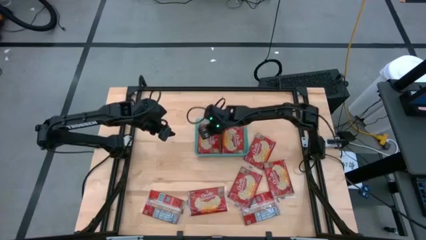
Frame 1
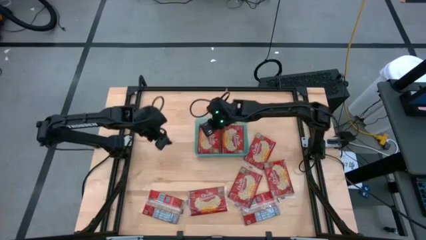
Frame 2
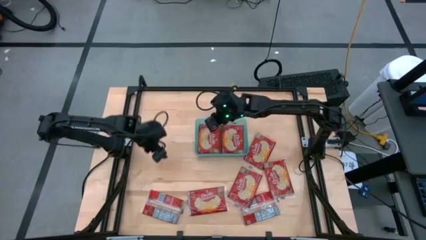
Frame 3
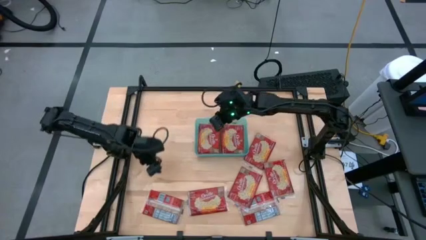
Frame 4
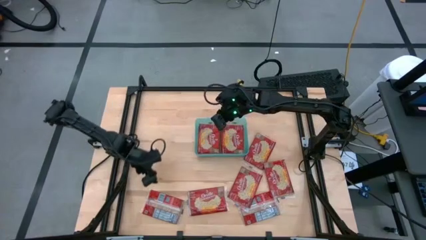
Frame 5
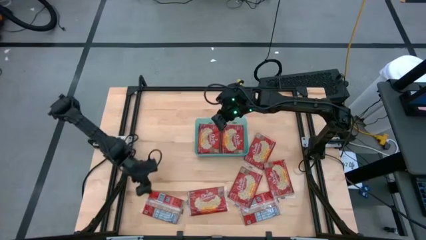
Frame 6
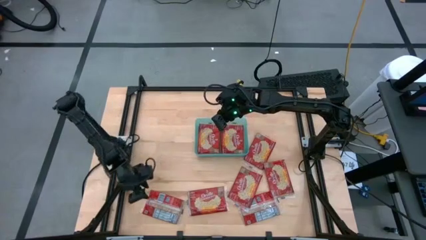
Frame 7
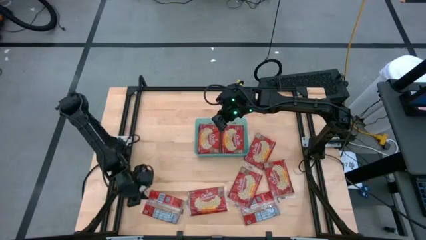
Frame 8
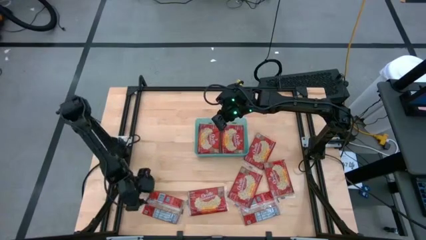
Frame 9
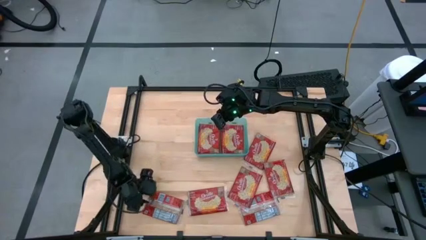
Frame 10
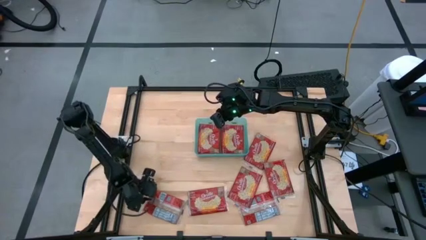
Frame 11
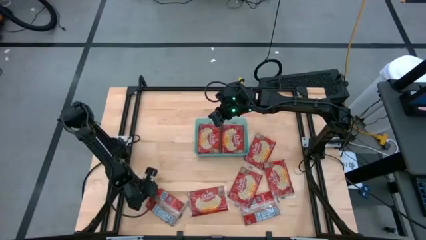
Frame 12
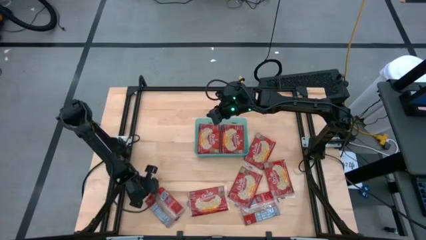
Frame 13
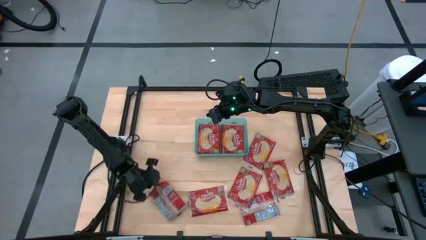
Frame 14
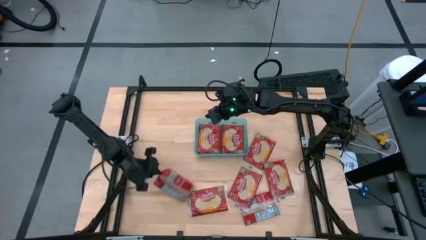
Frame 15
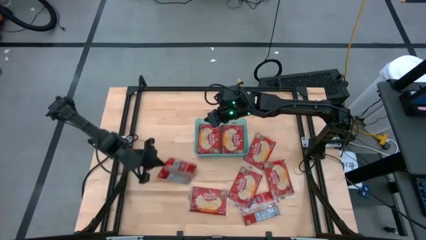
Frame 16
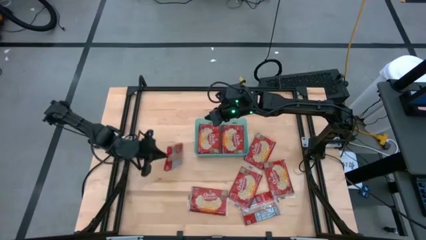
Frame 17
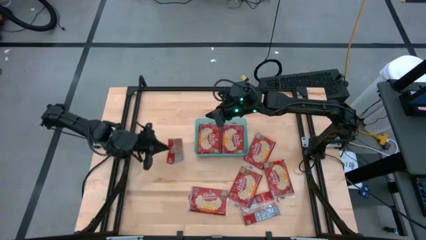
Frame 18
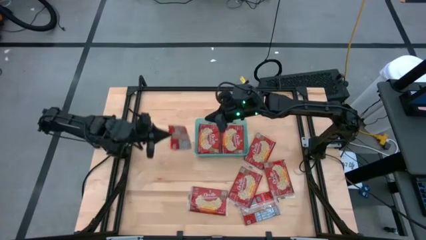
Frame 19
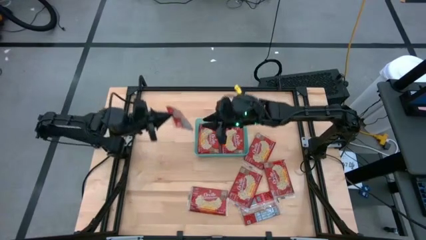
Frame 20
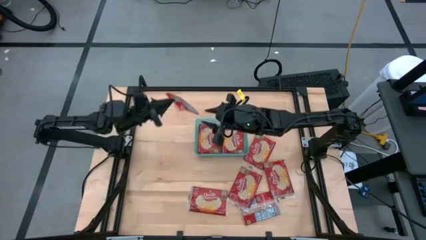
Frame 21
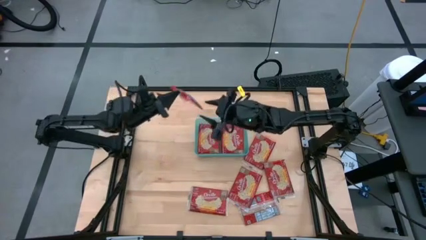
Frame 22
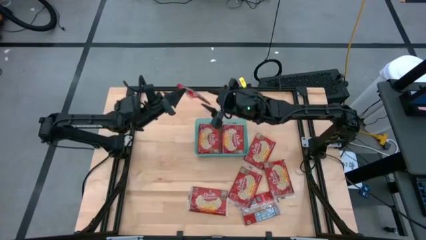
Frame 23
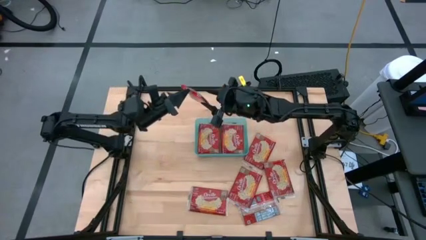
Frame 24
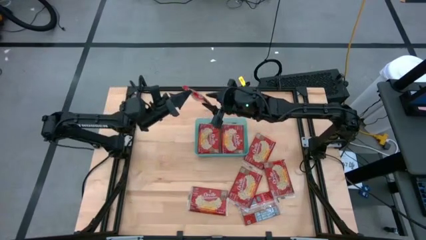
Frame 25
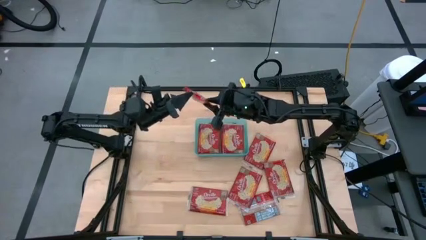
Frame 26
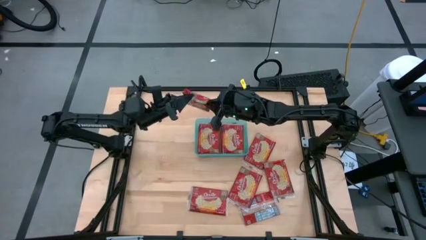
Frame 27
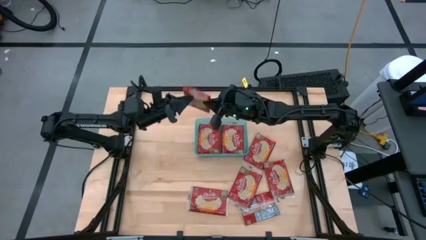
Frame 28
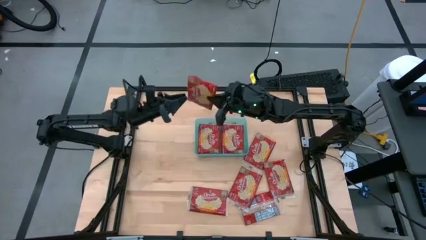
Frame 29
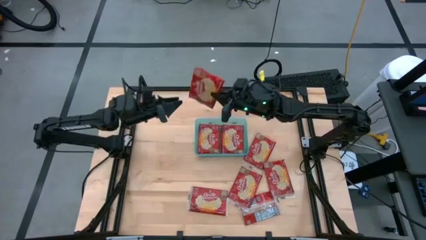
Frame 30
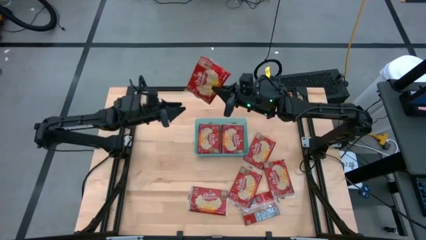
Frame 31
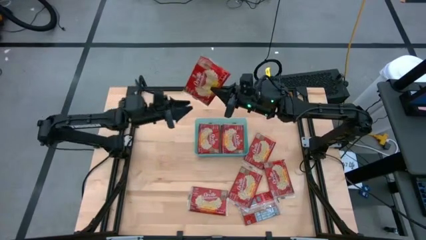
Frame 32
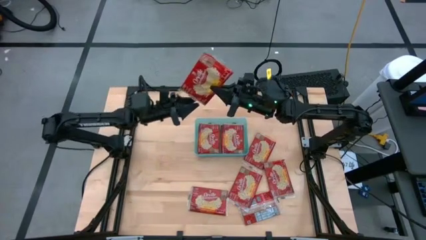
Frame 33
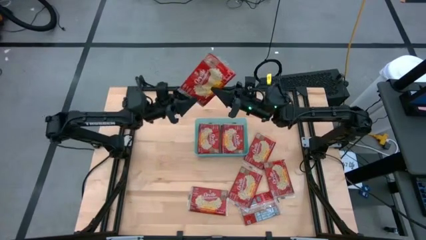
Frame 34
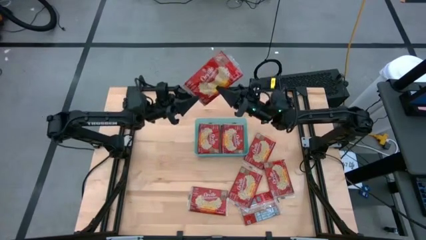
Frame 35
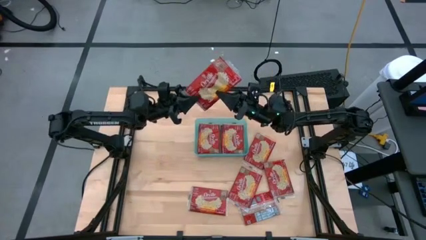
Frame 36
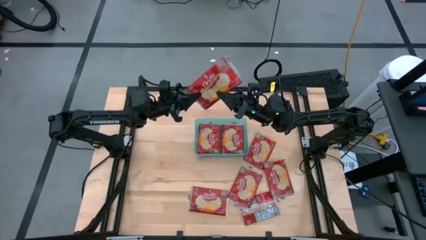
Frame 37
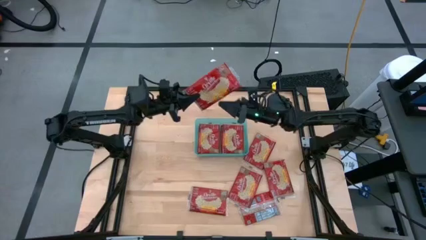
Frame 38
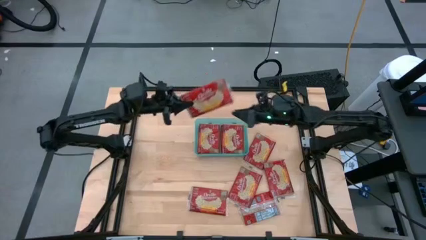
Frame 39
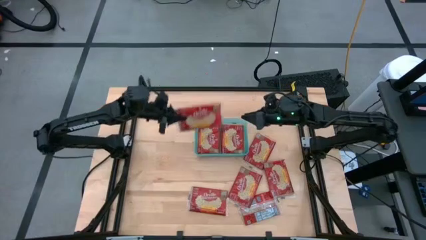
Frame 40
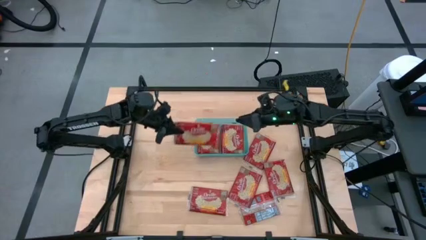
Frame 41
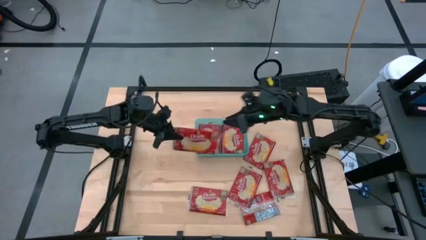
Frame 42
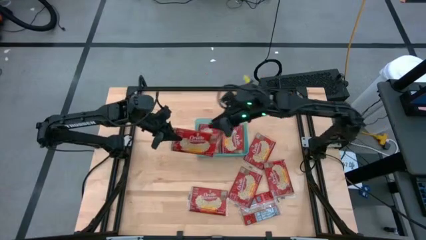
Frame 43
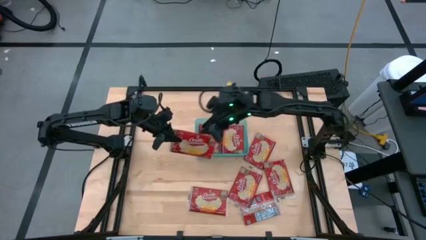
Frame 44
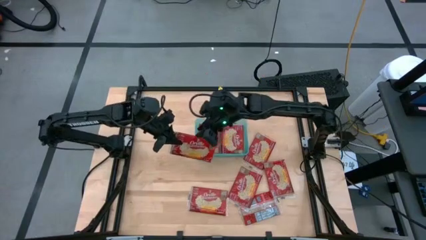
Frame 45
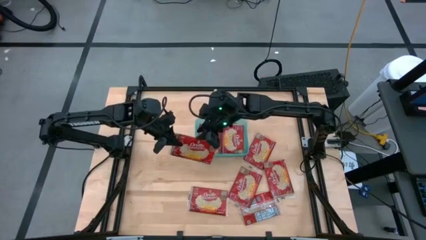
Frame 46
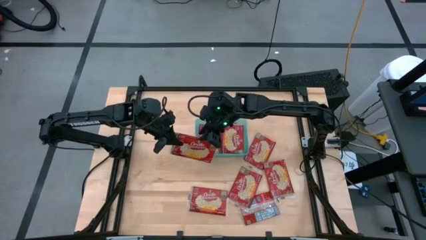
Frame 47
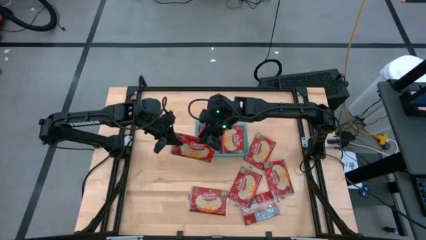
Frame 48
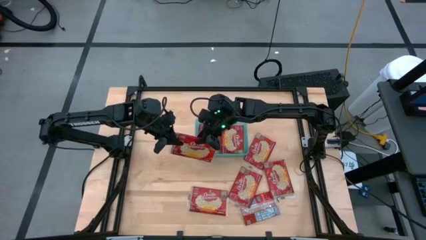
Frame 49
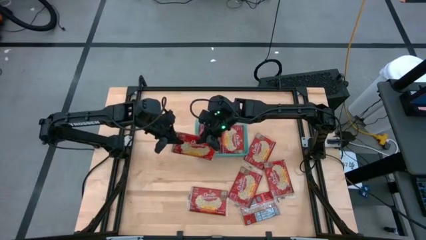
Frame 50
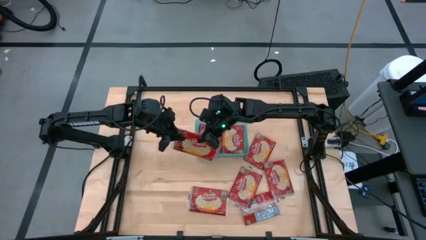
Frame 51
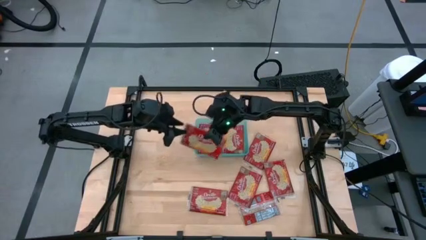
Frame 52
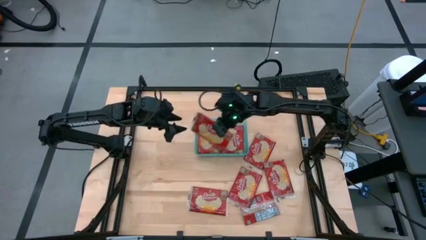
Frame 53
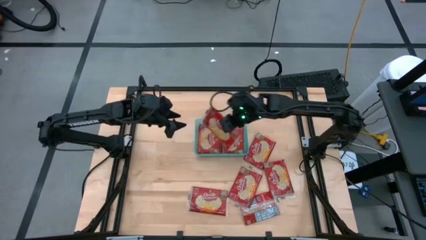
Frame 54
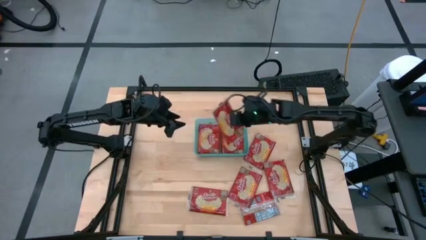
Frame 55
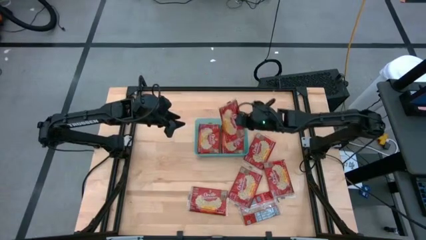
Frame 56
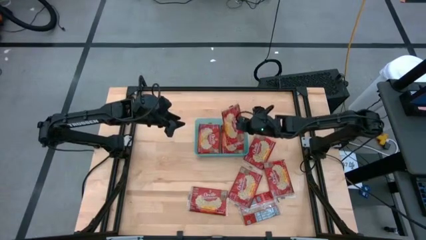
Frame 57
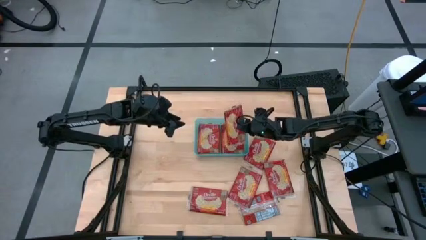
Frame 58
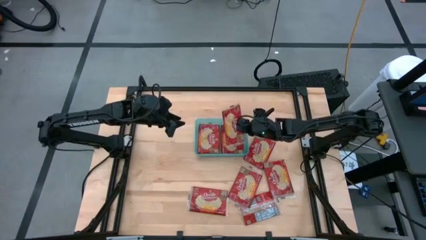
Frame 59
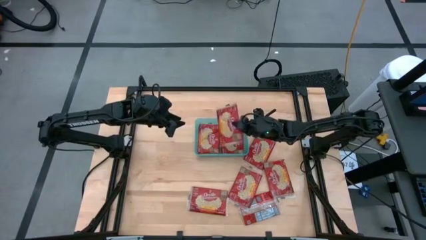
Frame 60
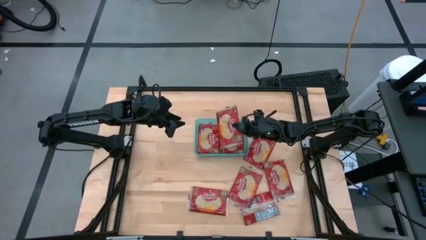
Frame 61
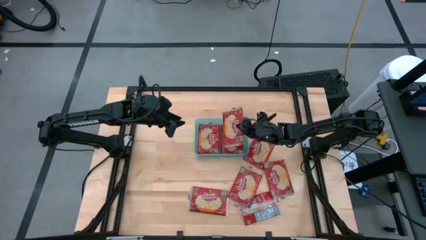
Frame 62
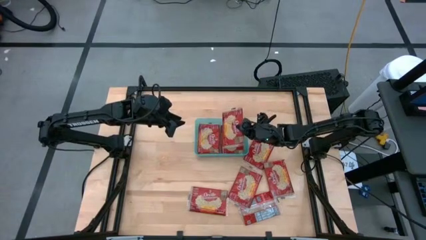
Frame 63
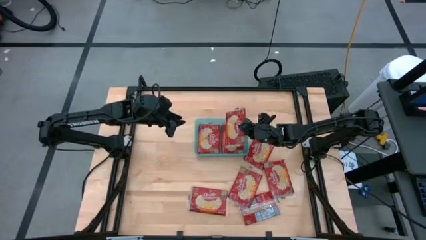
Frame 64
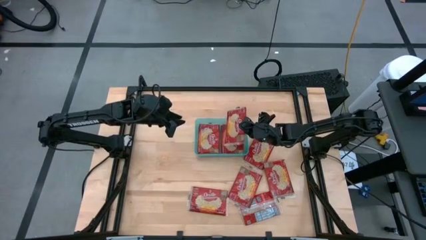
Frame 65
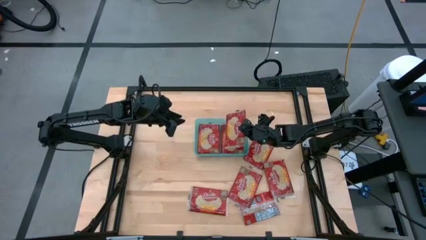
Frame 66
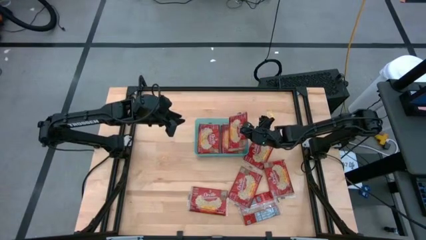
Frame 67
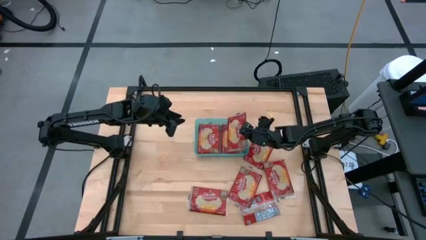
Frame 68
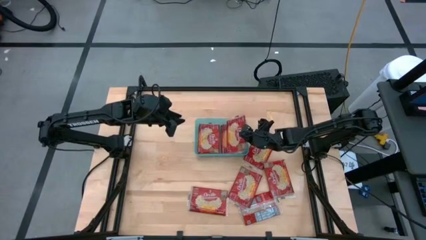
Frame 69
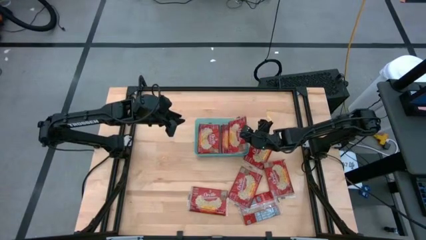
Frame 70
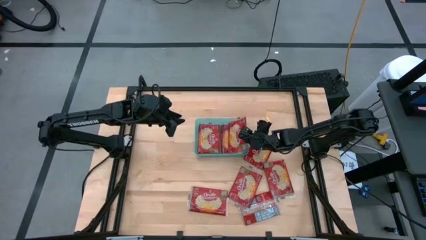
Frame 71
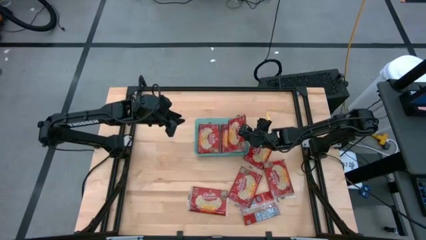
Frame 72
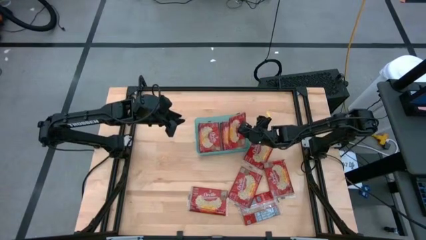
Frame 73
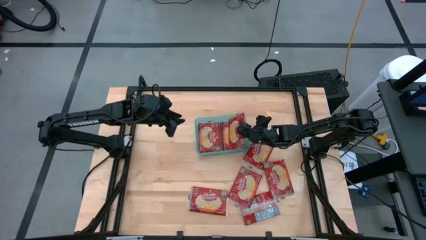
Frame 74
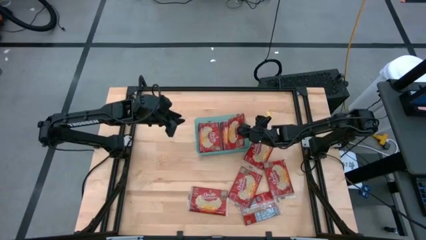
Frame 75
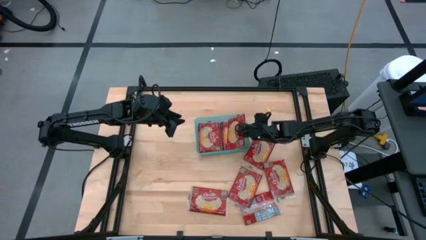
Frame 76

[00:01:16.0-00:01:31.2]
Task: Sort popcorn bags into baskets
Put the red popcorn bag into the green bin
